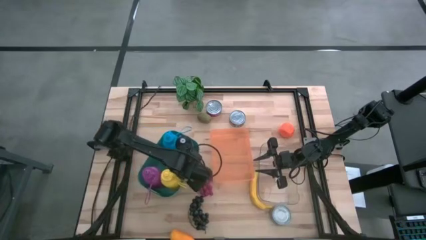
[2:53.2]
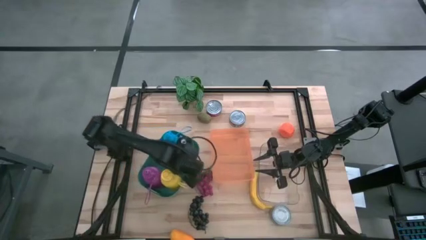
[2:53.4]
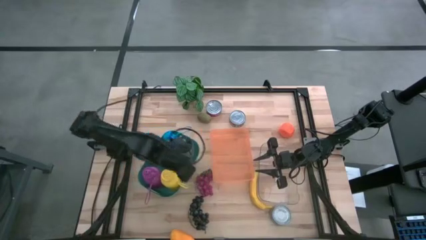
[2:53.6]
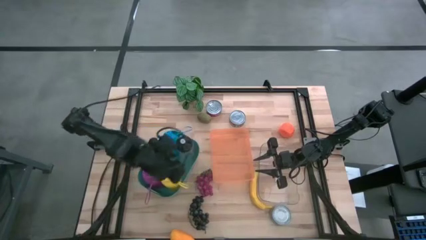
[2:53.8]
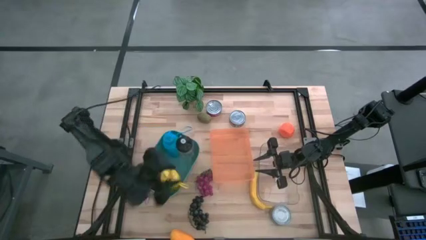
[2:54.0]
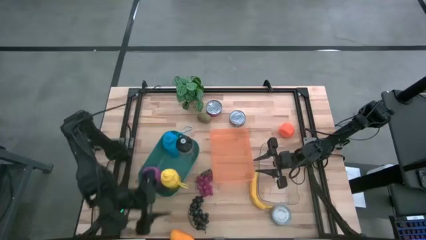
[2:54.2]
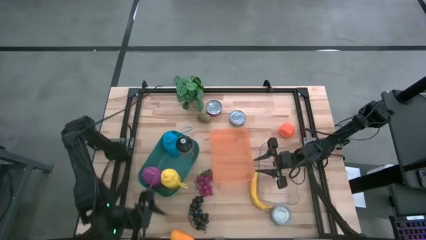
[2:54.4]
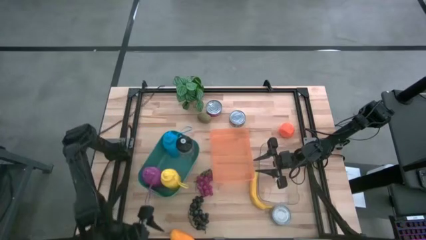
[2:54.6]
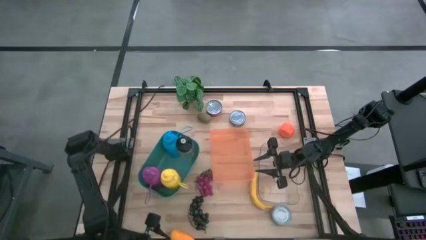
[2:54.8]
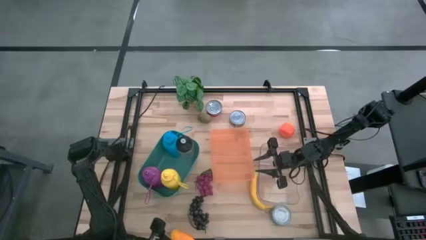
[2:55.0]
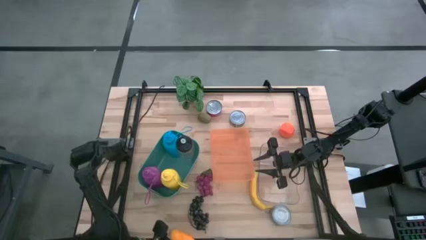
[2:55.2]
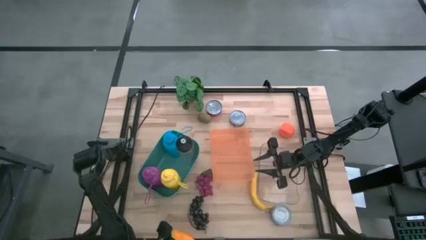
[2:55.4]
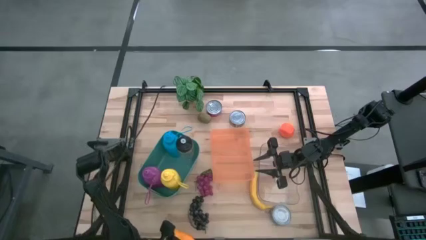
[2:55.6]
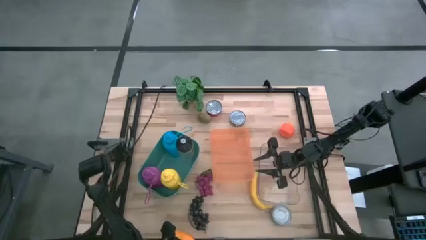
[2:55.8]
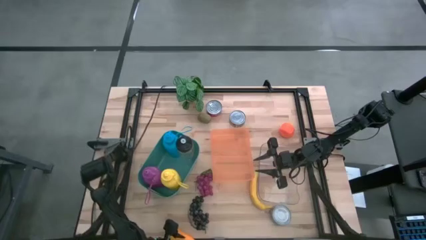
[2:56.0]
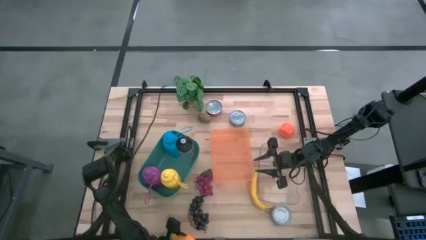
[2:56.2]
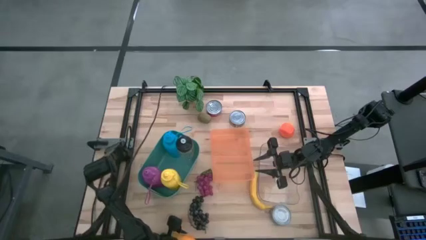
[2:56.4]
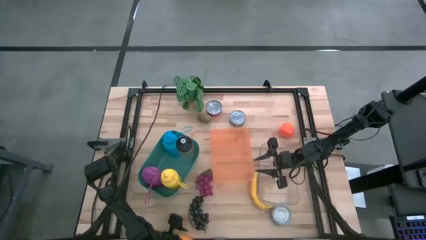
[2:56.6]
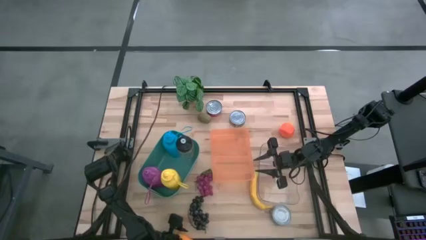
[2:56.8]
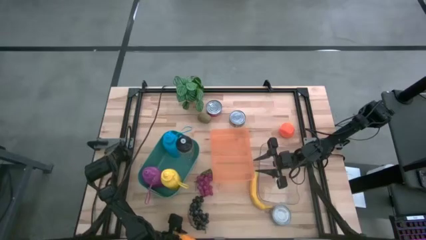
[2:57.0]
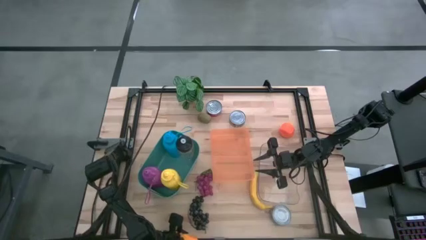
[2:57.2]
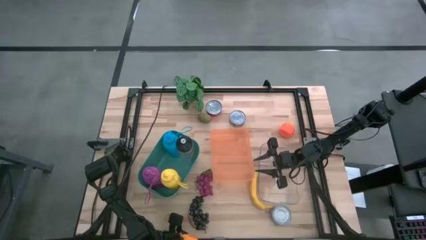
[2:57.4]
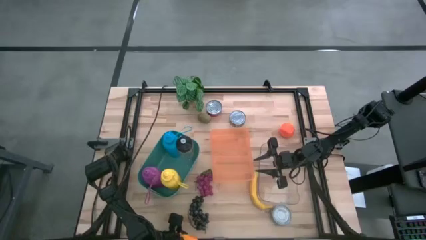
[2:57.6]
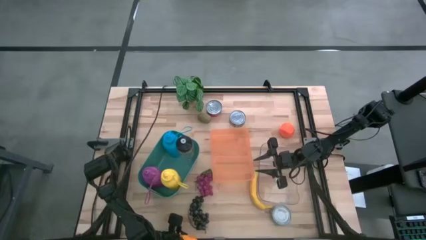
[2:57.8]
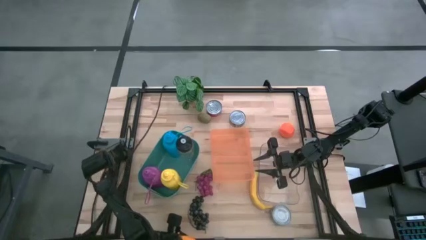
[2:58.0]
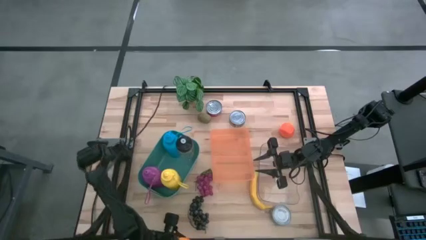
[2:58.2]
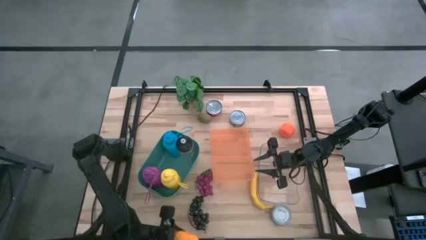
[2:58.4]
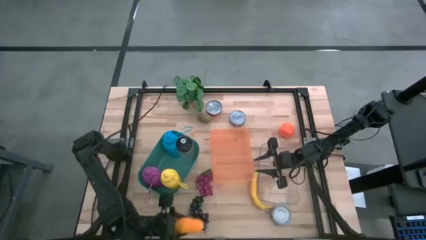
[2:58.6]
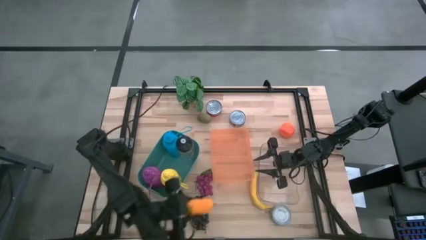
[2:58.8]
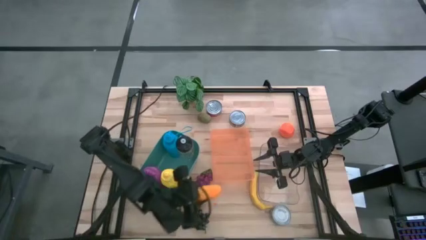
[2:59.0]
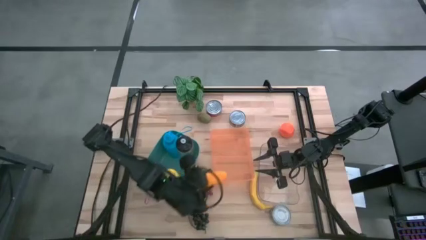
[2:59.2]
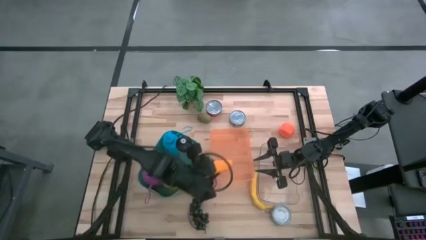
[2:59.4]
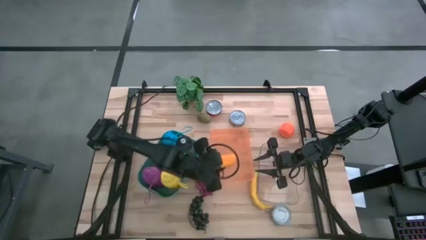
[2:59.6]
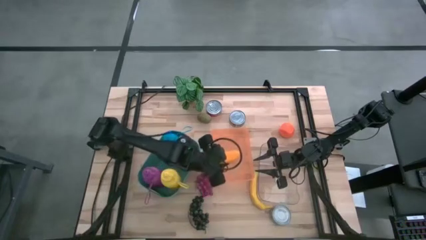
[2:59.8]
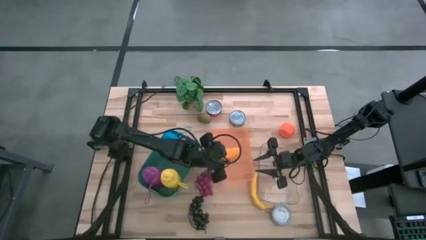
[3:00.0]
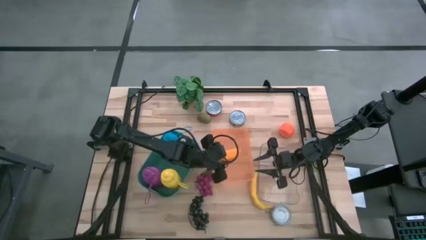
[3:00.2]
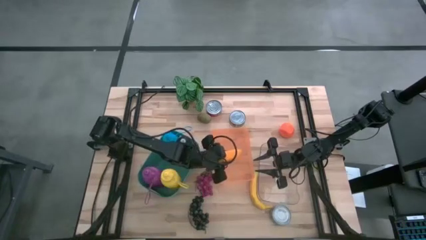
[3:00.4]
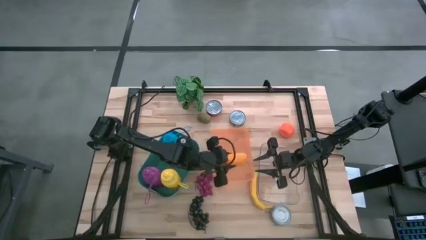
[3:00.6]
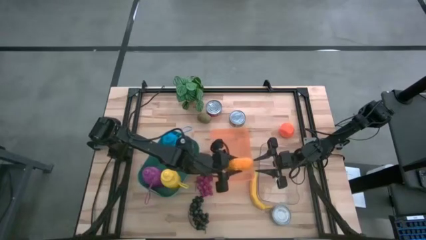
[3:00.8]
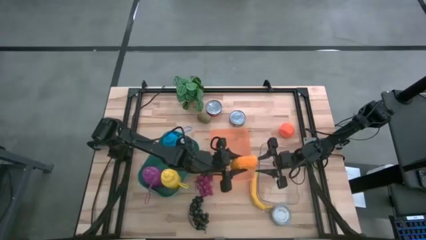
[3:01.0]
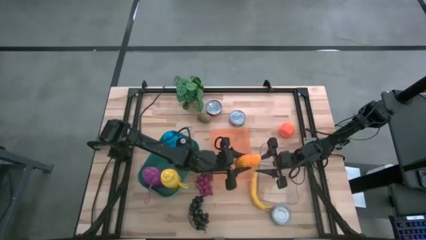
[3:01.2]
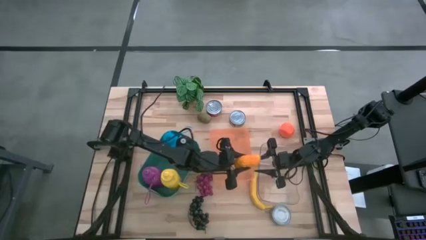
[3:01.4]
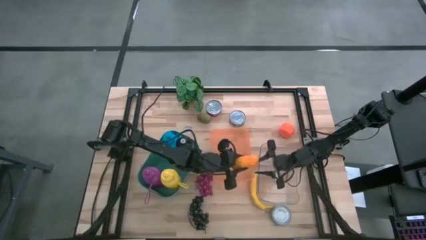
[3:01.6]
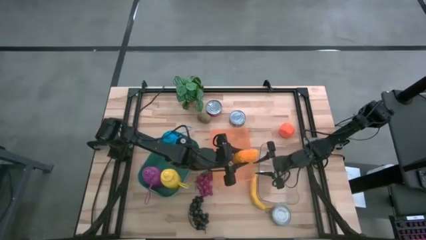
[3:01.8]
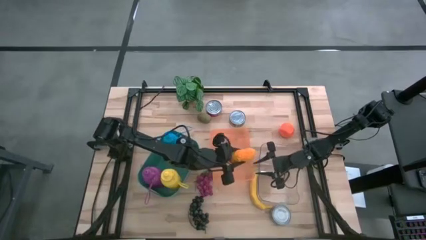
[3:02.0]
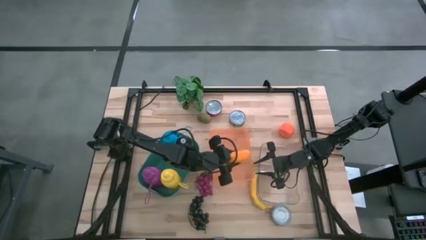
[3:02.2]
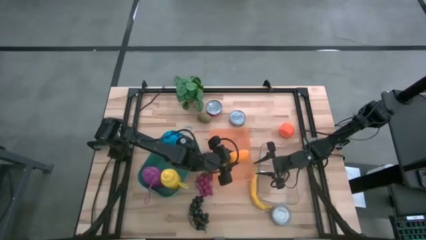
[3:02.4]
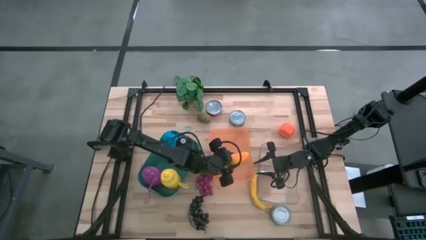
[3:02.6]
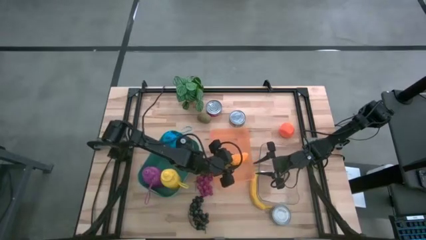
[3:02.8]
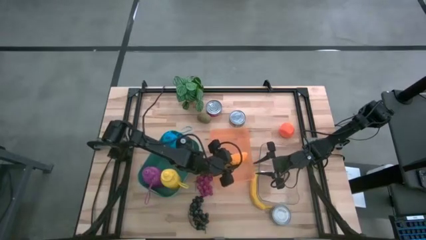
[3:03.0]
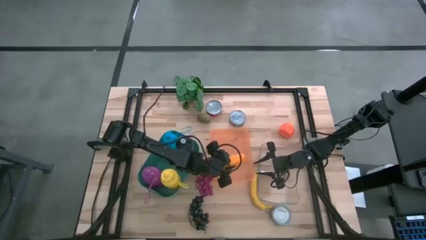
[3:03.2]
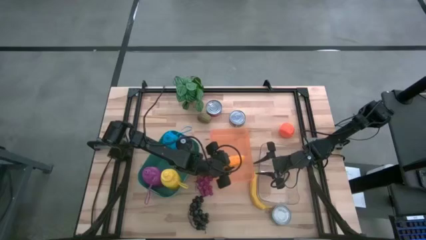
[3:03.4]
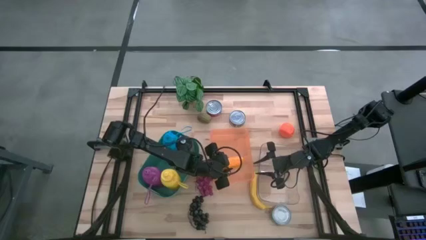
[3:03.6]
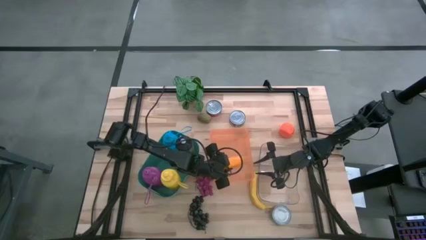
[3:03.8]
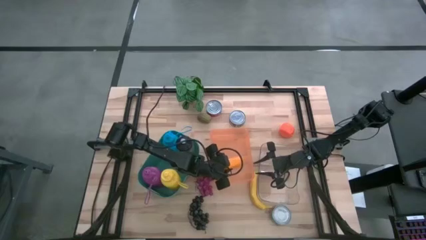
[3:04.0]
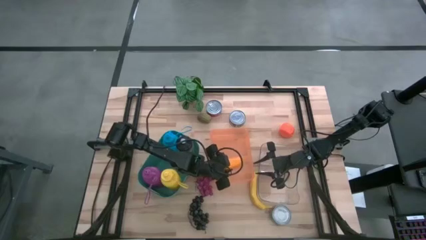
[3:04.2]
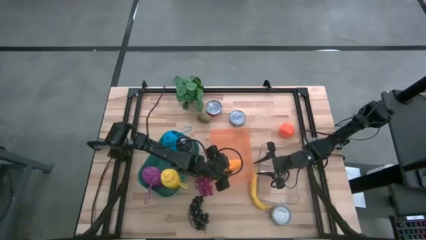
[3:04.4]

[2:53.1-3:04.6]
Task: Pick & Place Food Item
Put the yellow mango into the orange bin

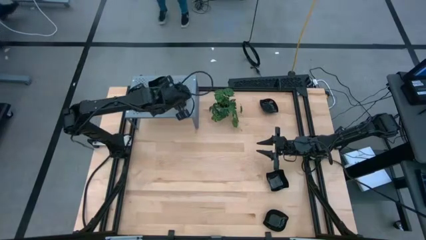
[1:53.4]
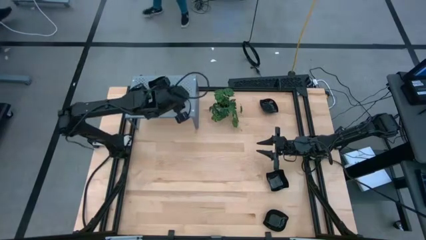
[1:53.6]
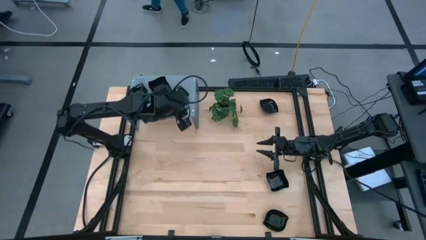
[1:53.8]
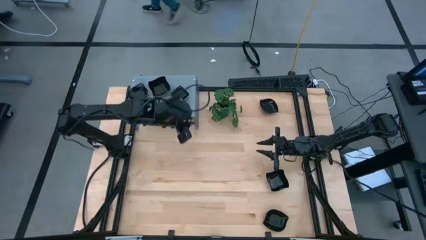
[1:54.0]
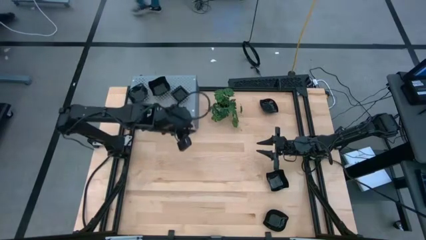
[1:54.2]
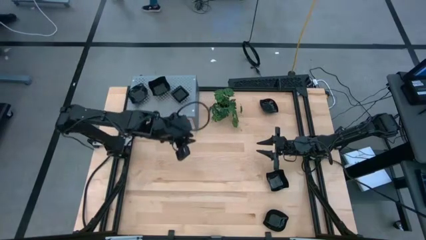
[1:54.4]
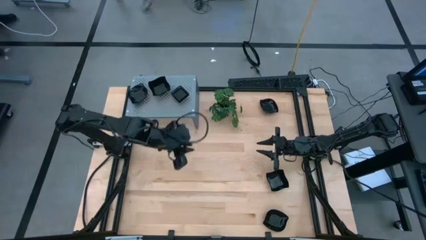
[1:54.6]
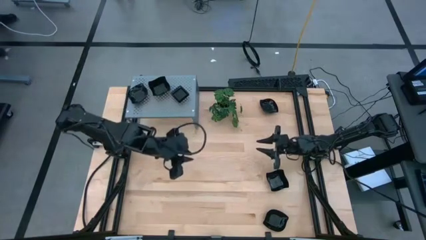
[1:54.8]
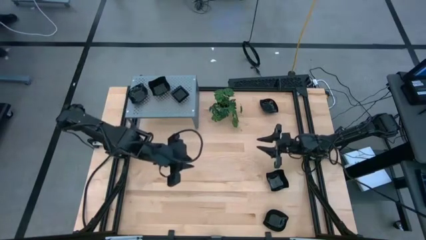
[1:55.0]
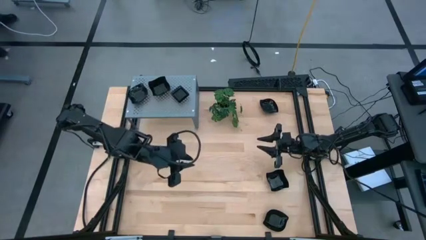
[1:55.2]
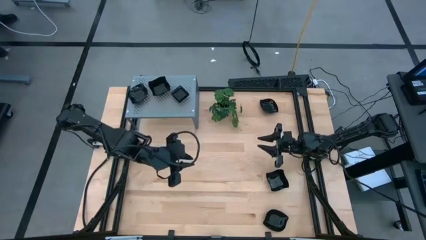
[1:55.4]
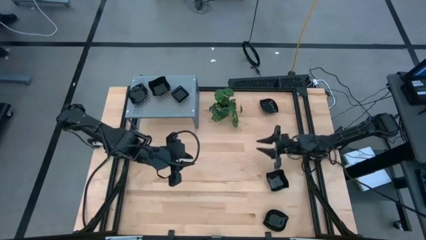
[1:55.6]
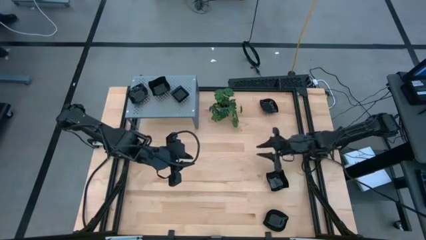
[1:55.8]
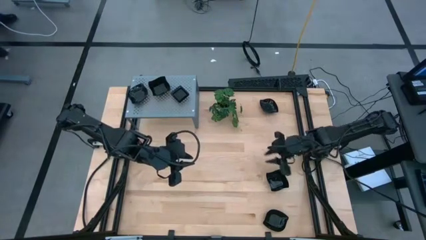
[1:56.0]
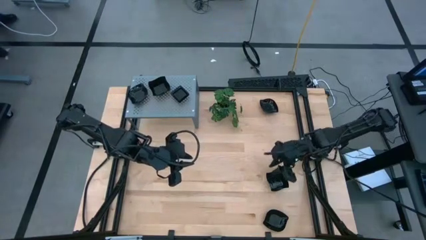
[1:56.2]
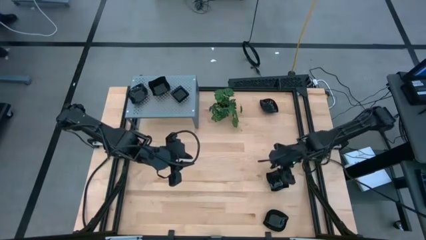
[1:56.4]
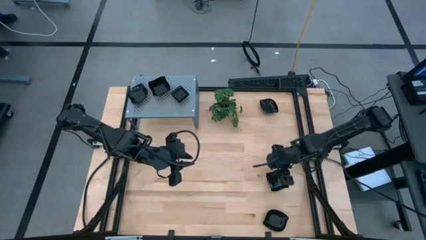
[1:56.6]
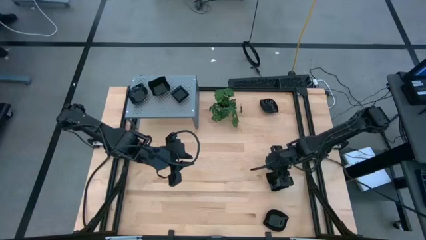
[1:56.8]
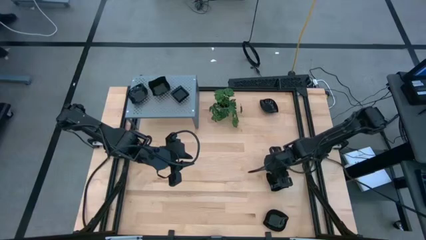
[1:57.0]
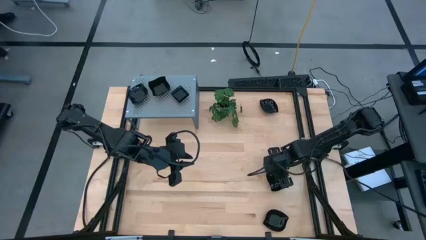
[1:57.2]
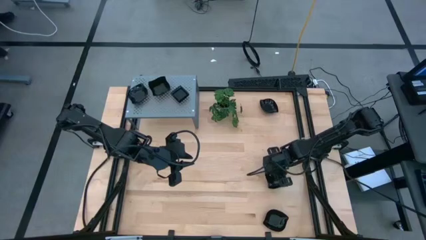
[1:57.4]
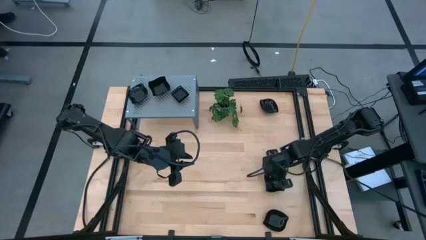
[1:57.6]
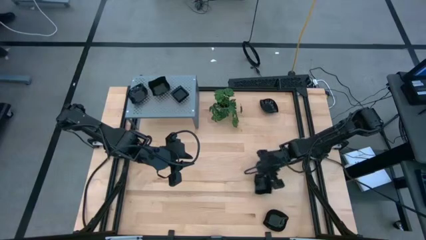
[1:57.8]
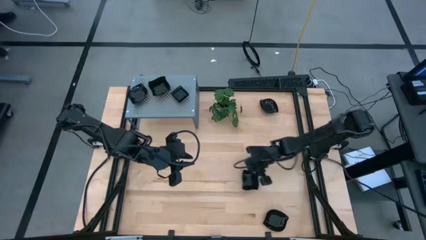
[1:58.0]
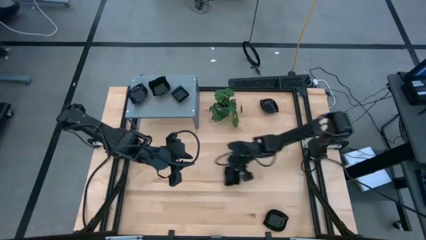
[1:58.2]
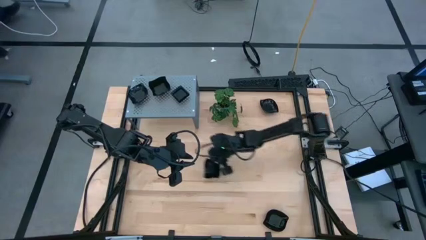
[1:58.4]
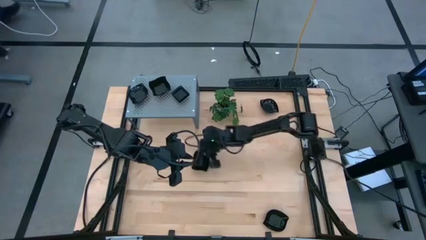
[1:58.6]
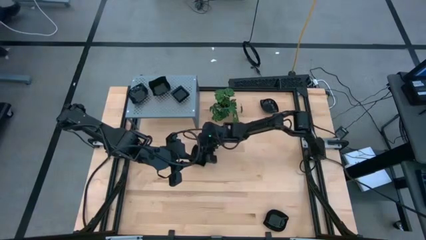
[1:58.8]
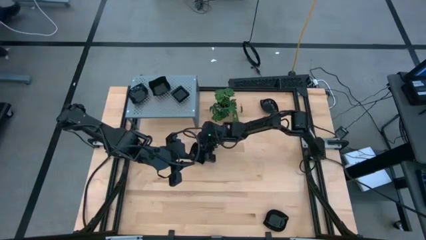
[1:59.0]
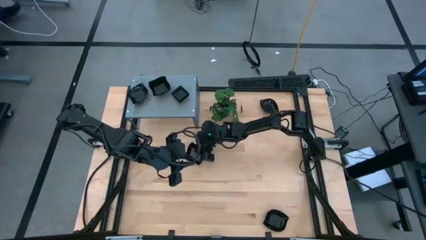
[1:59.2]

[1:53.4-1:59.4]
Task: Pick & Place Mini shaped plates
Move the black distorted square plate to the center of the table
